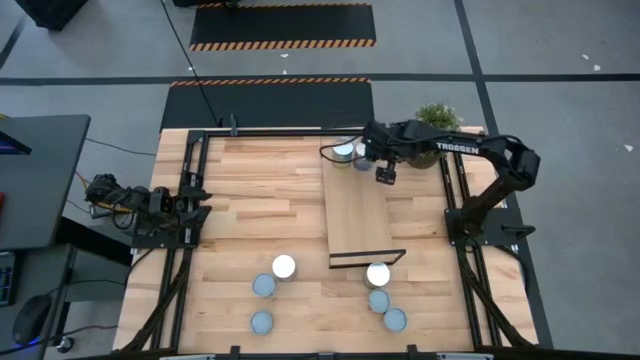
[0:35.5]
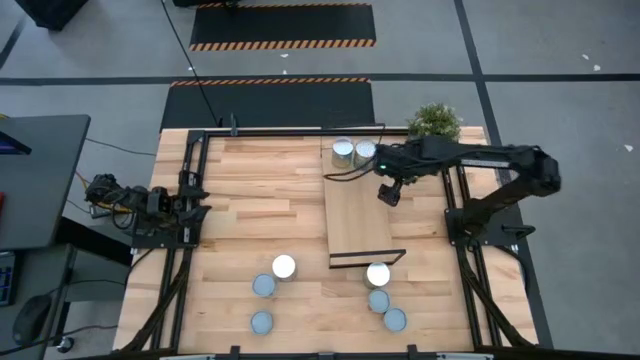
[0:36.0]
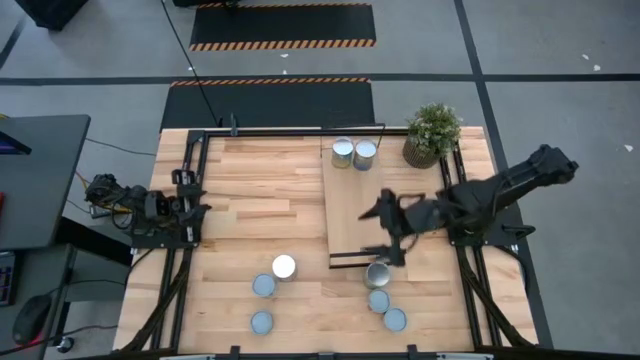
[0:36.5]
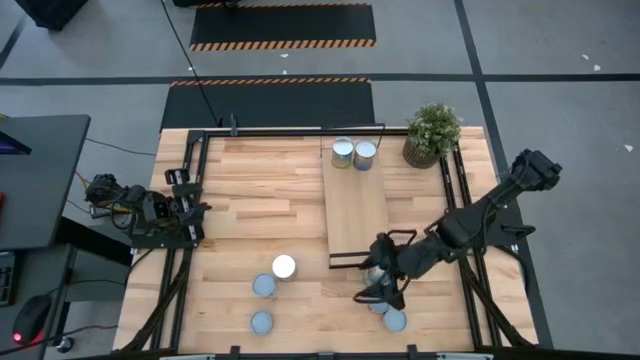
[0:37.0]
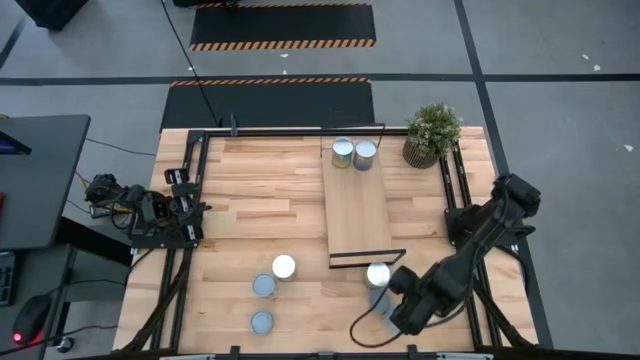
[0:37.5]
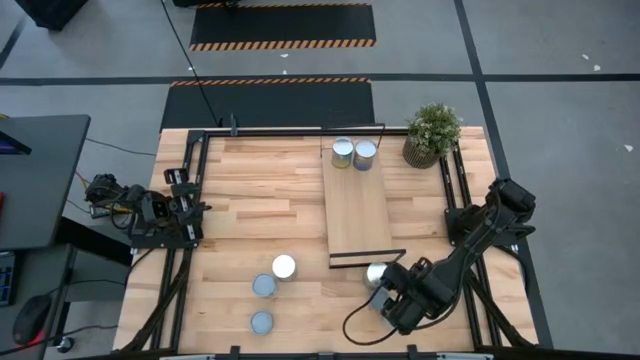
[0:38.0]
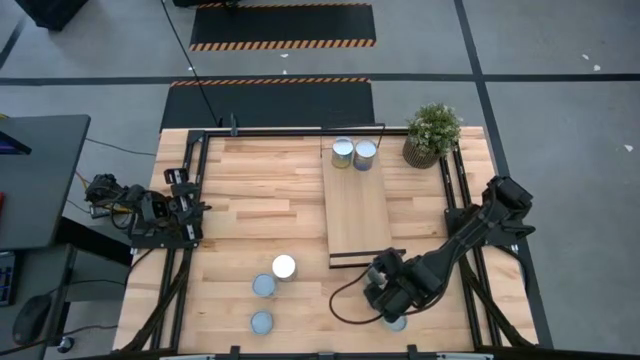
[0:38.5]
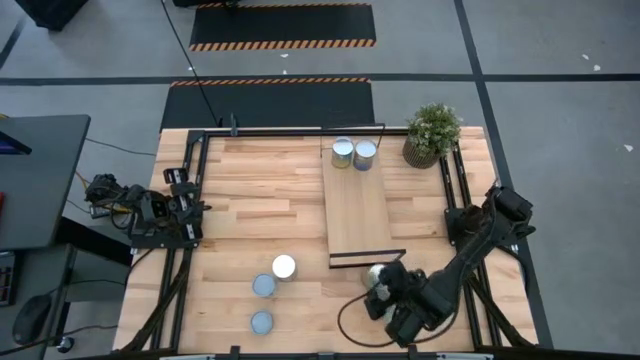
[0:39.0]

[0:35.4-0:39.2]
Task: Pick and place cans onto a shelf
Put the canned oranges on the shelf

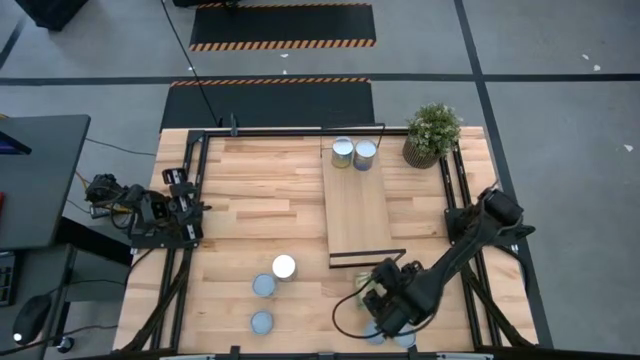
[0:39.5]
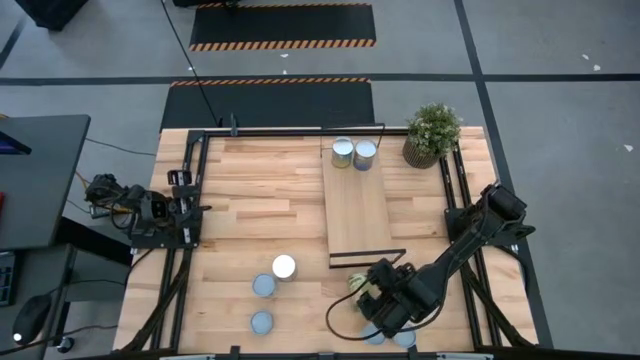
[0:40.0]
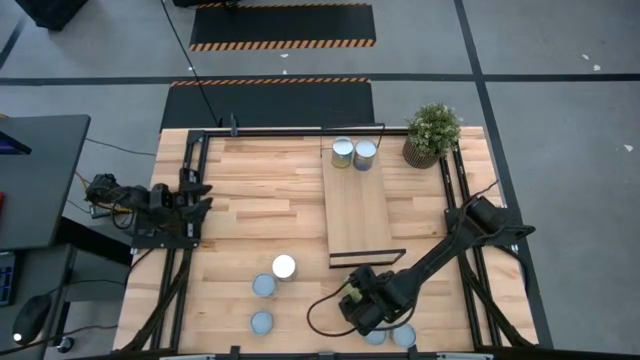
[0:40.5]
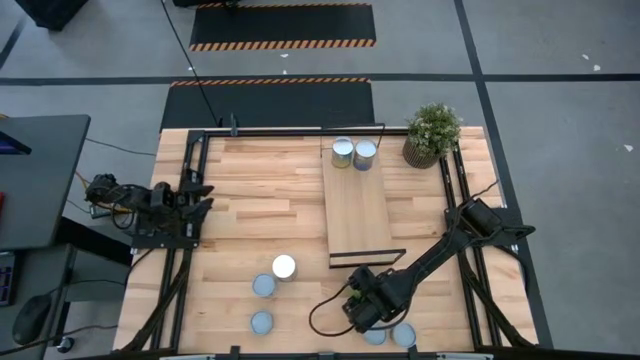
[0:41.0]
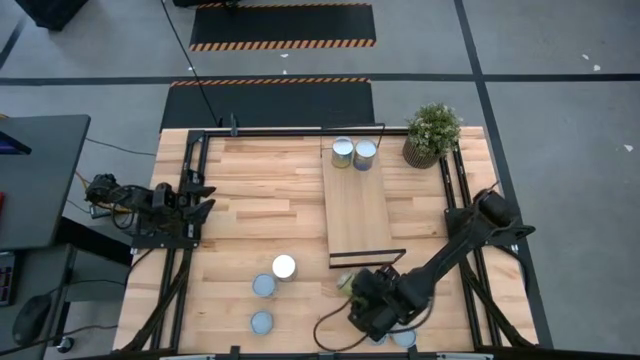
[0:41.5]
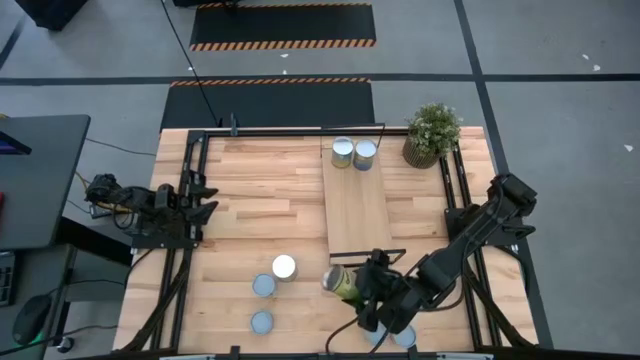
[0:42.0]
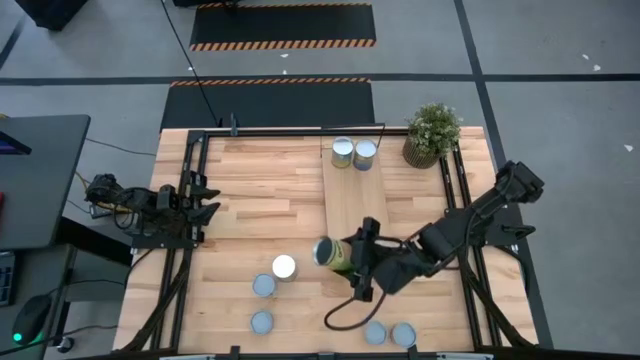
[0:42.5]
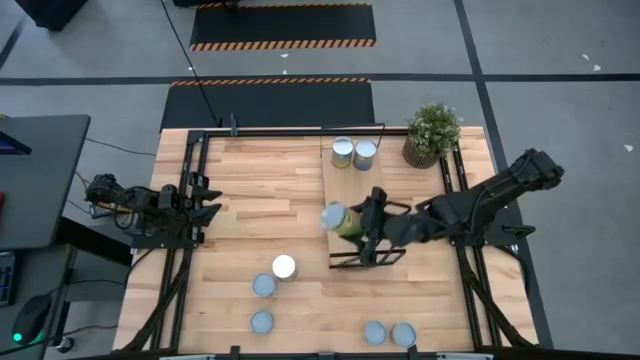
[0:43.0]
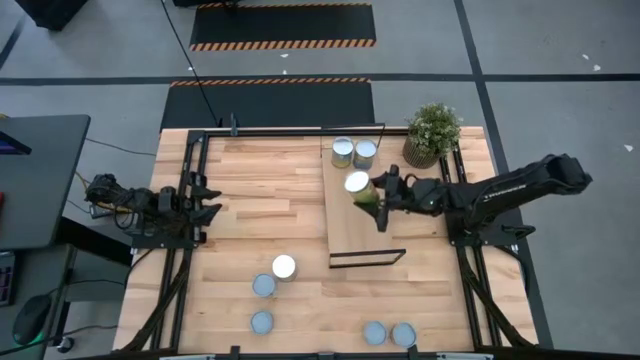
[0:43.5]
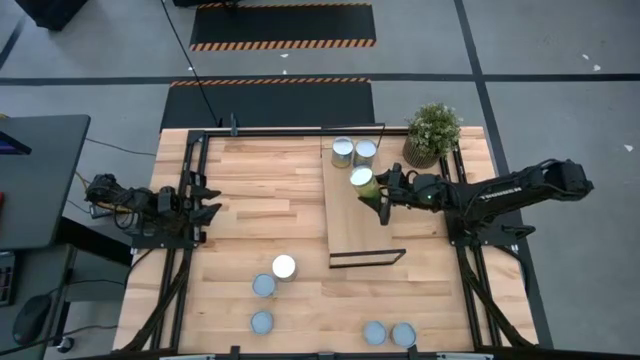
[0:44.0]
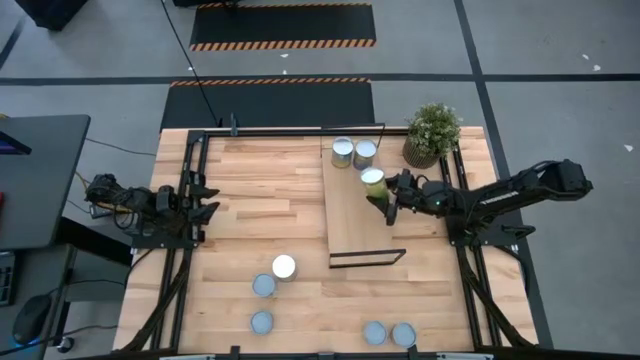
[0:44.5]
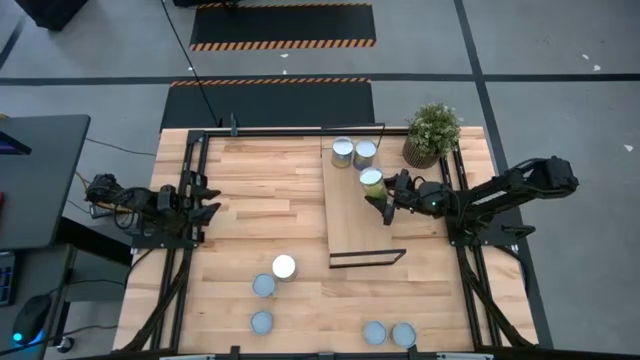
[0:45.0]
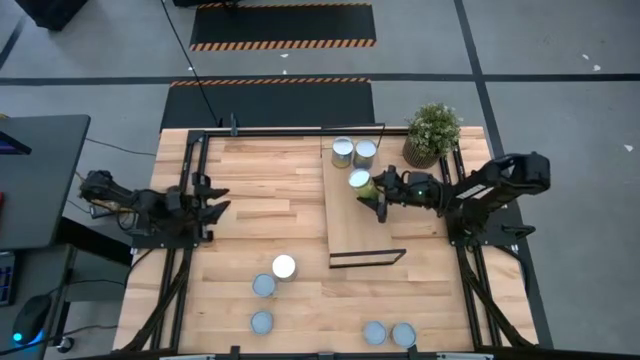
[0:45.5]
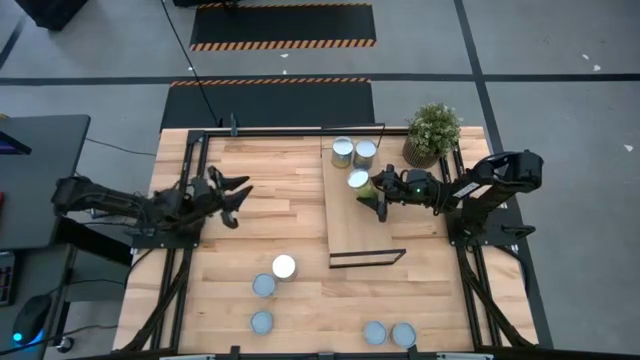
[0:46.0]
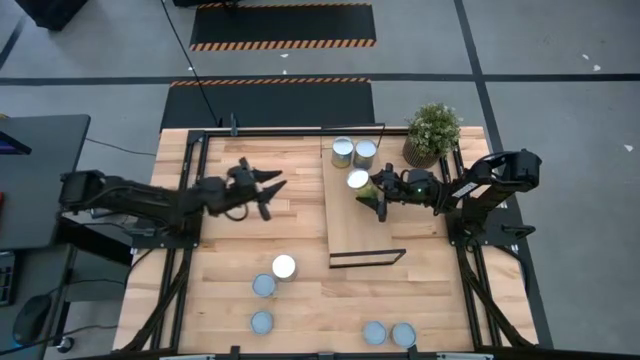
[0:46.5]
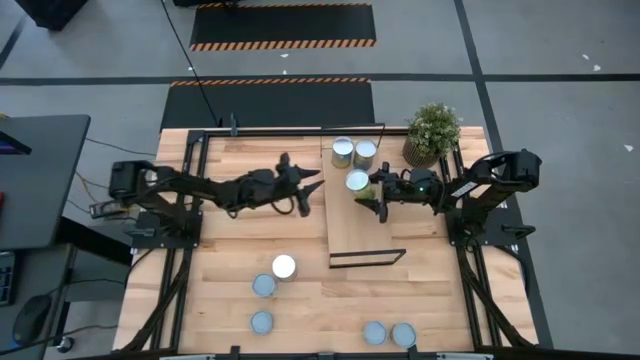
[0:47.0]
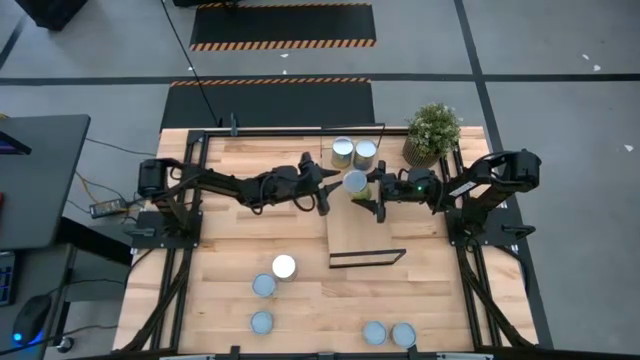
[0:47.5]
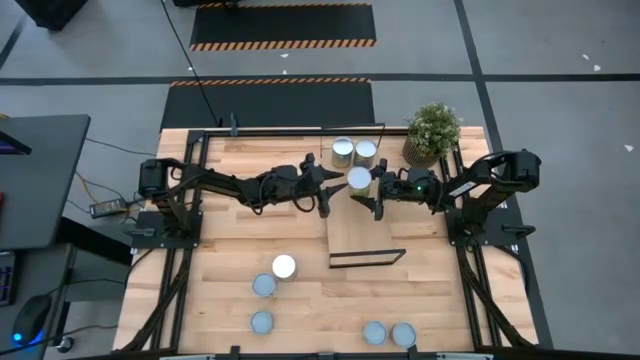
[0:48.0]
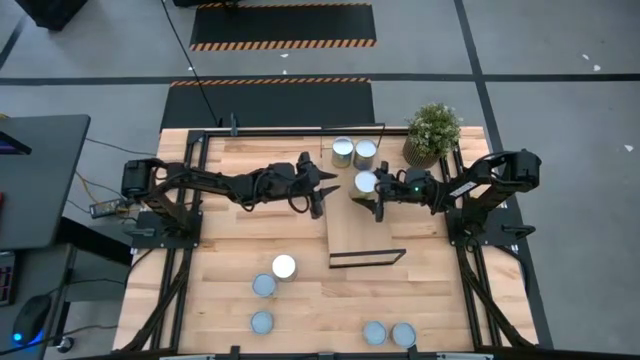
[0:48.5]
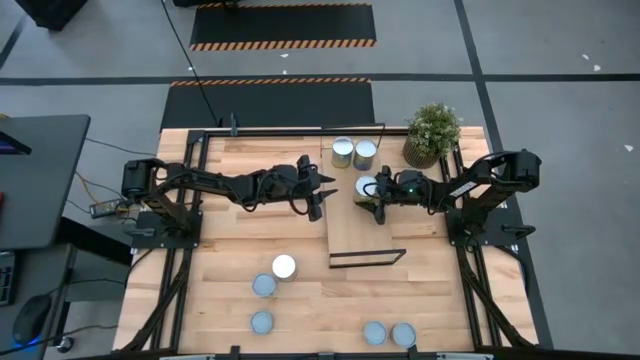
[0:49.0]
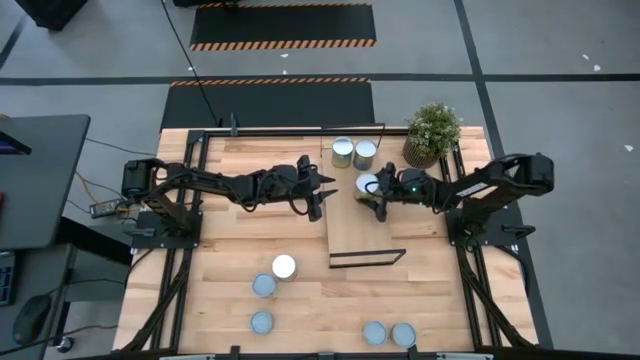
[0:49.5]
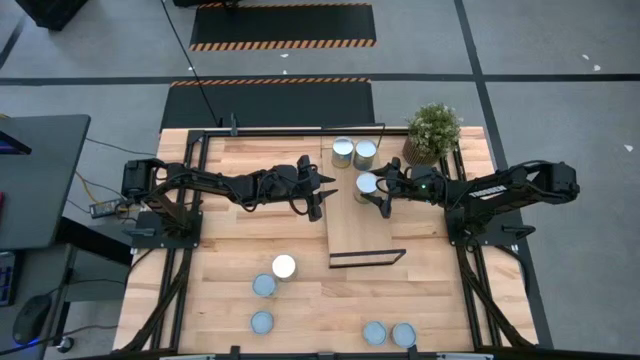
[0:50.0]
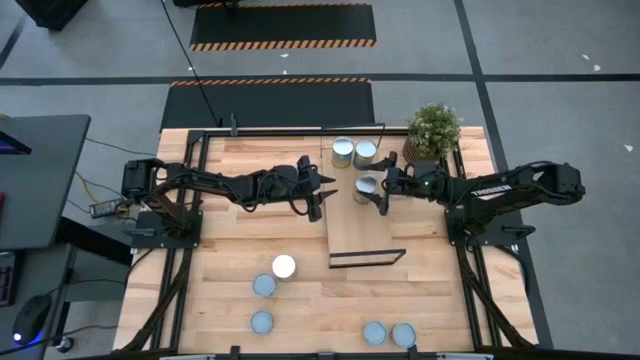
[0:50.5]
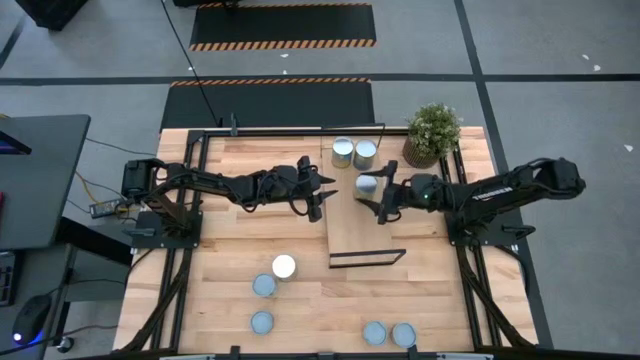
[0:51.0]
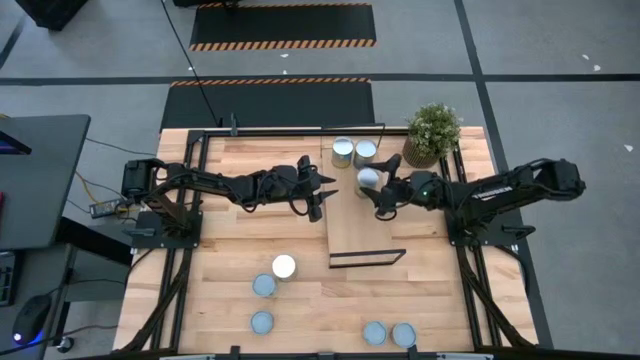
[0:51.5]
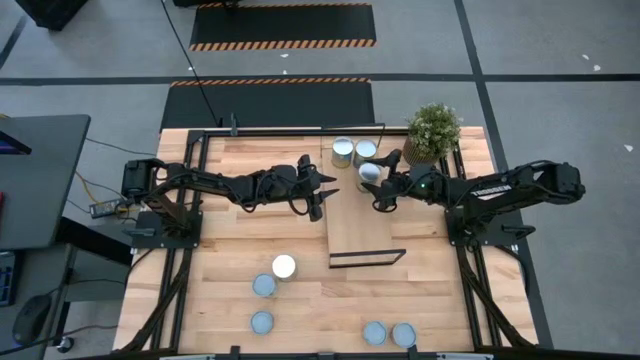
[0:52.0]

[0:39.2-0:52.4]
Put the canned oranges on the shelf
